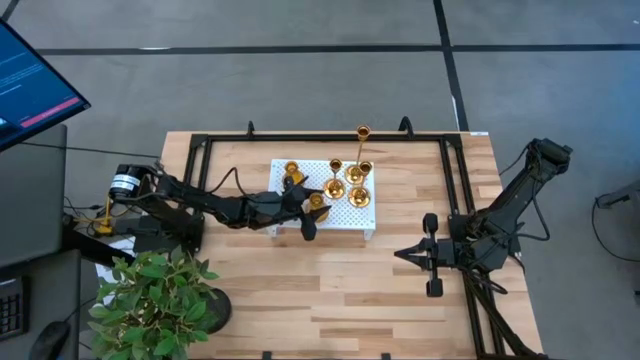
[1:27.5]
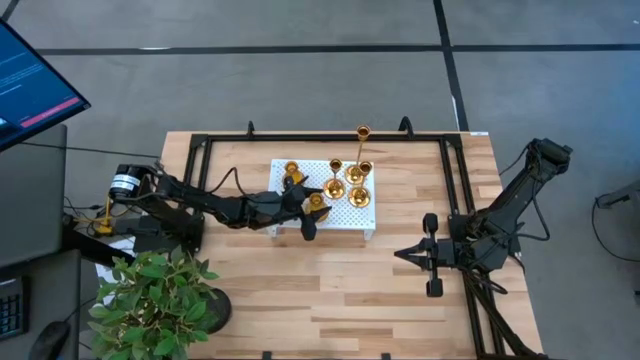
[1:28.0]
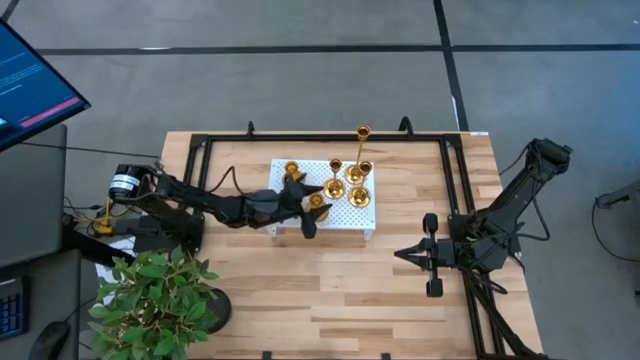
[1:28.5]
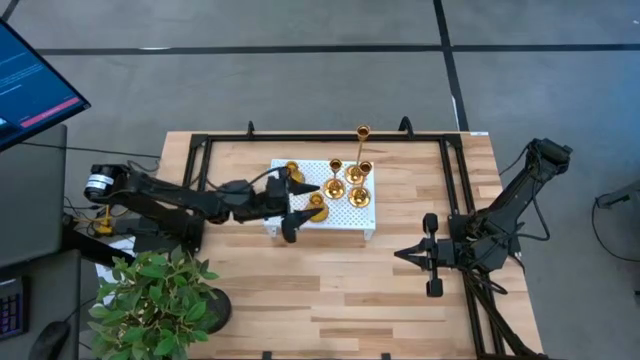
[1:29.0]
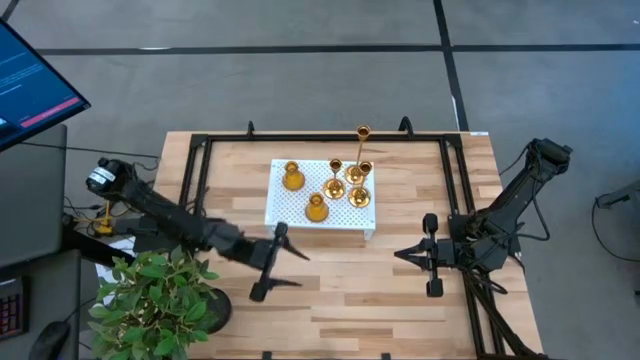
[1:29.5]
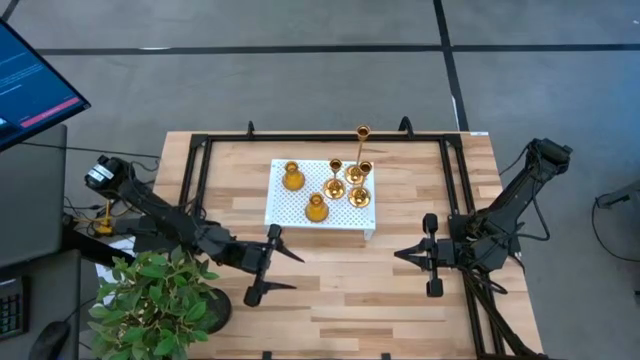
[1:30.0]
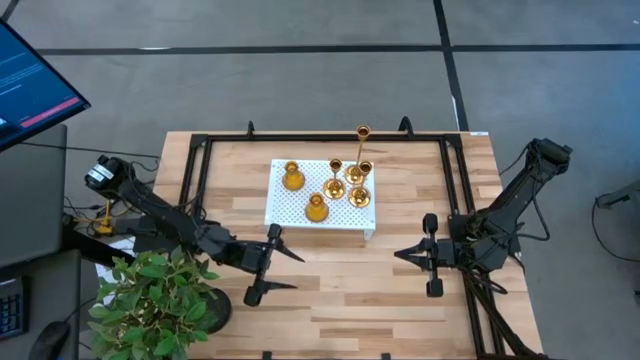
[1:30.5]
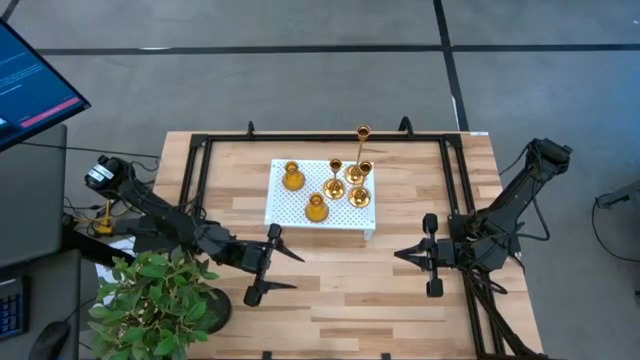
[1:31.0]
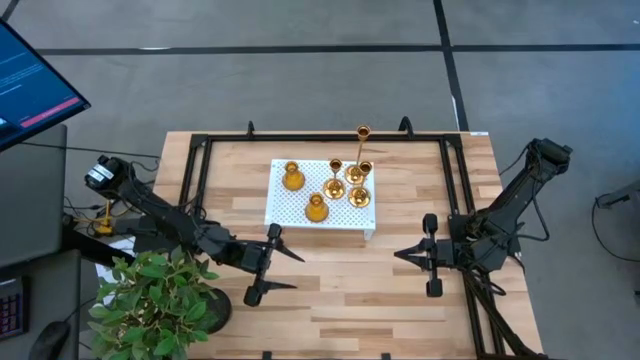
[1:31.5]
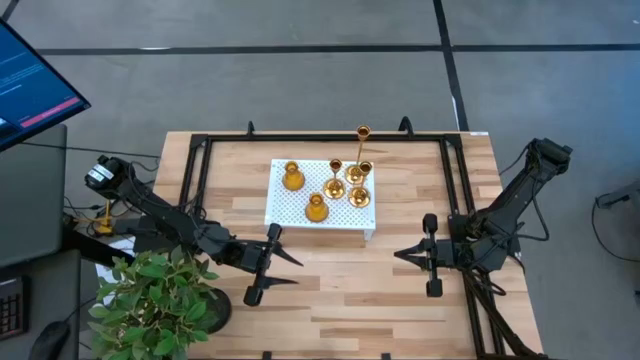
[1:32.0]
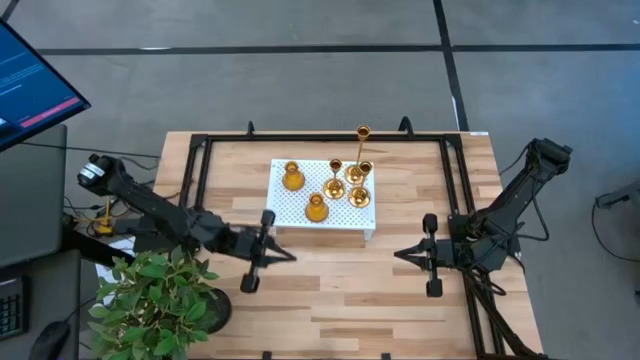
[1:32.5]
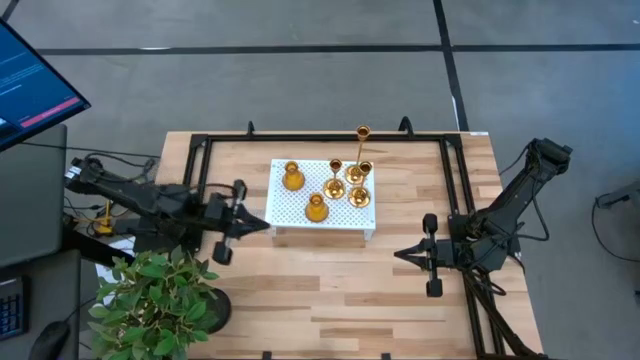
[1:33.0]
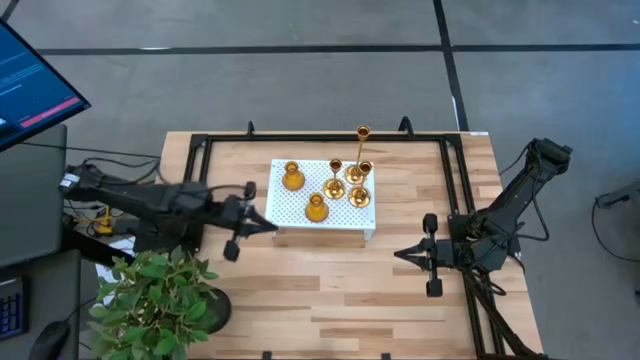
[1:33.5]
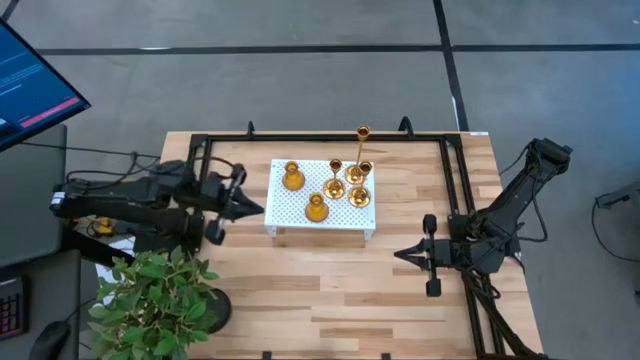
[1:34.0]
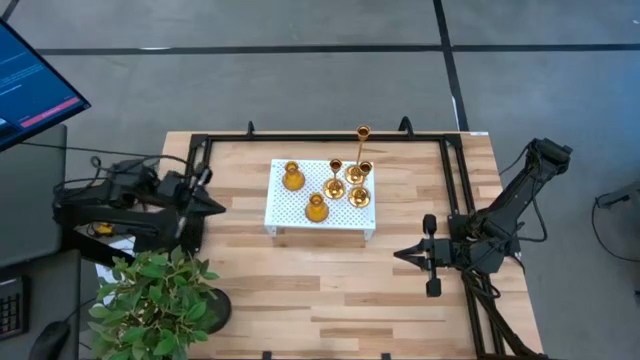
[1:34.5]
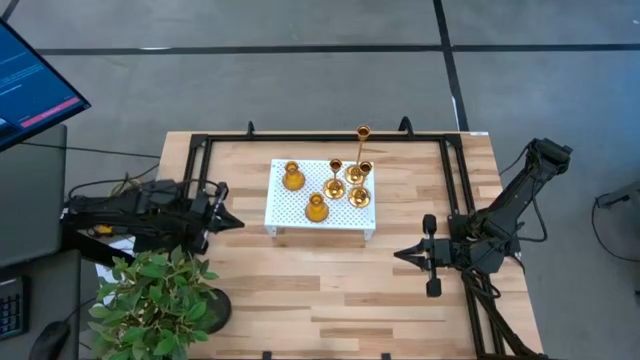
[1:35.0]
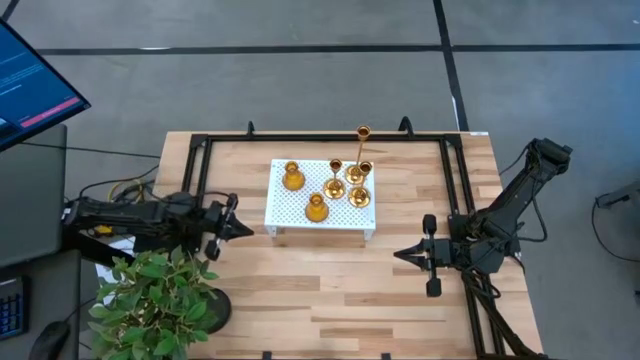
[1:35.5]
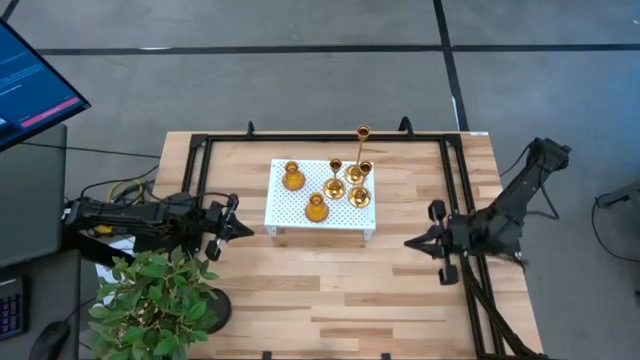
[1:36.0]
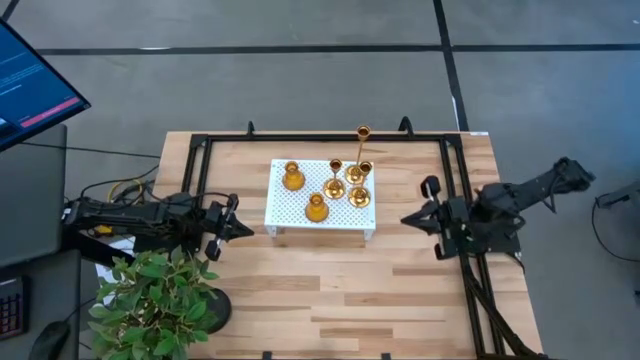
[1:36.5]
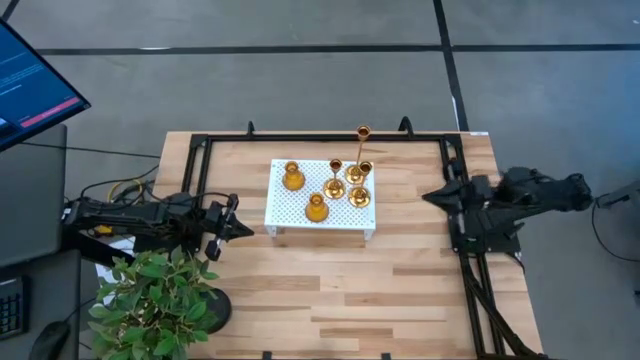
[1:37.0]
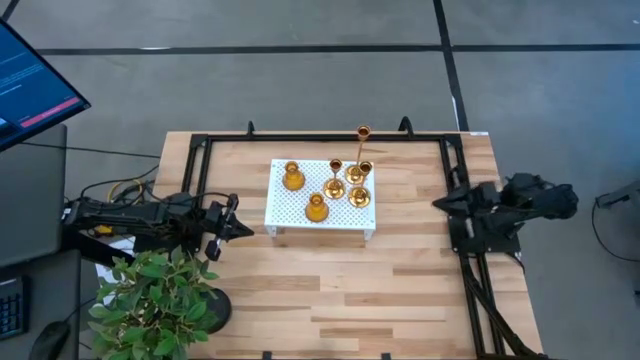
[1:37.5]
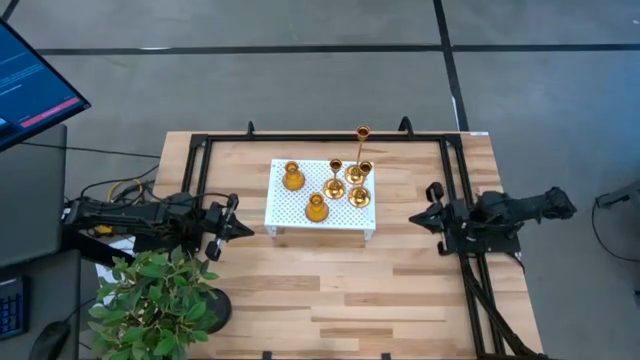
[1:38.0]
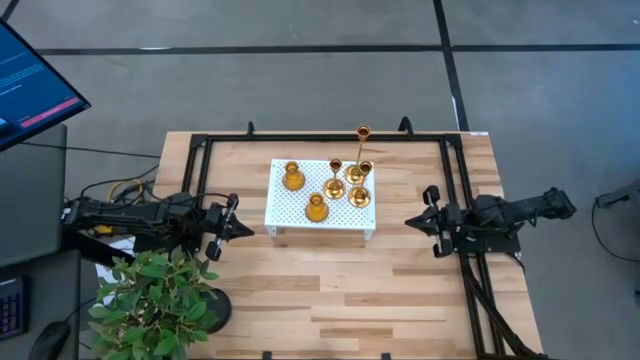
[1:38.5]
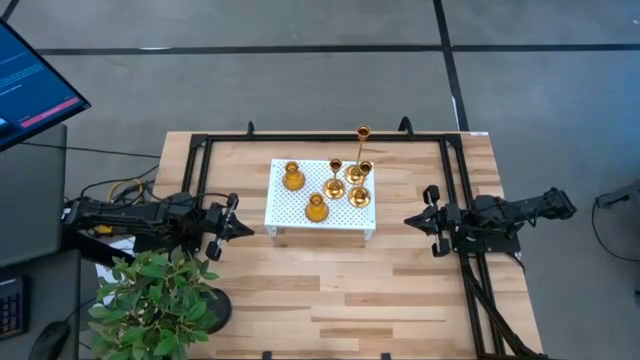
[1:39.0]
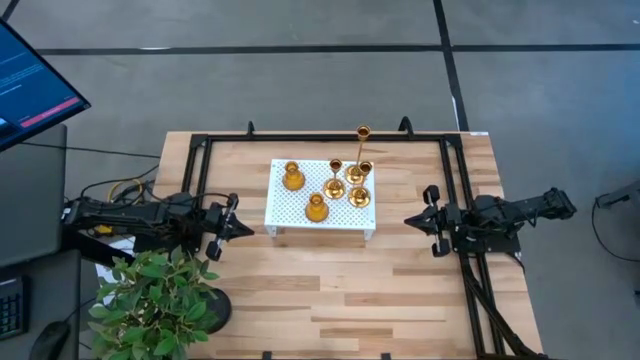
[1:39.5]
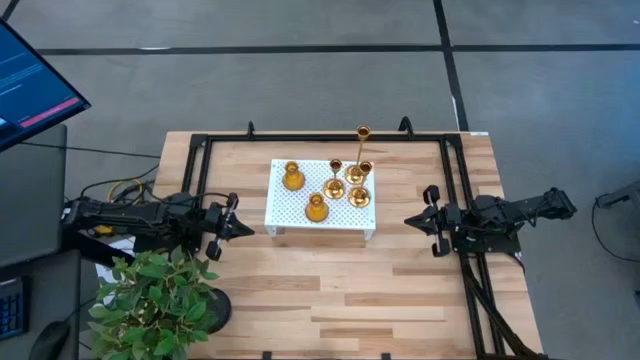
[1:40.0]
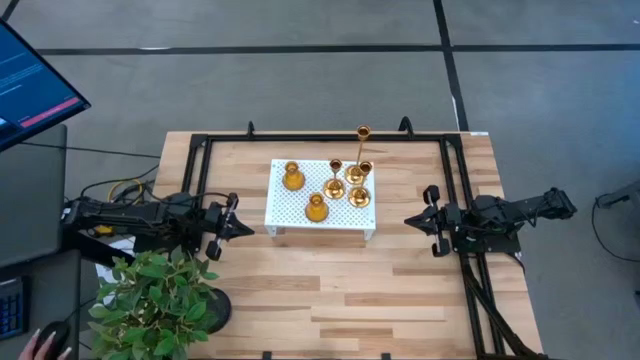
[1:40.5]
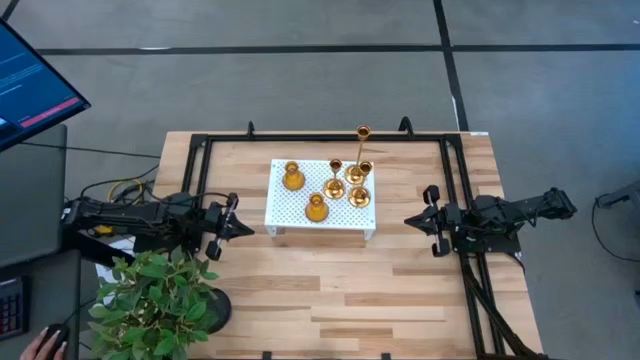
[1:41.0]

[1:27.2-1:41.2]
Task: Pick & Place candle stick holders
Return to Home Position
